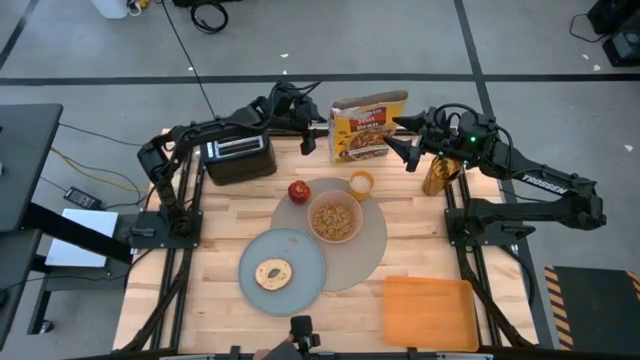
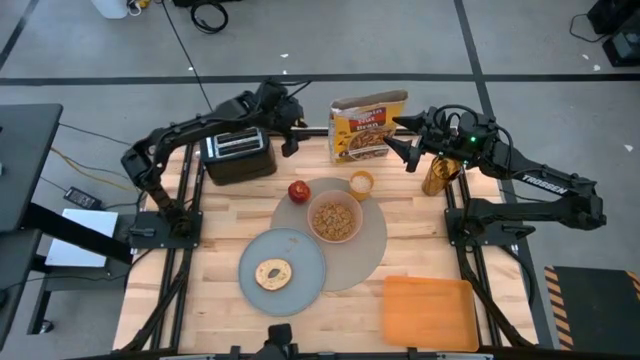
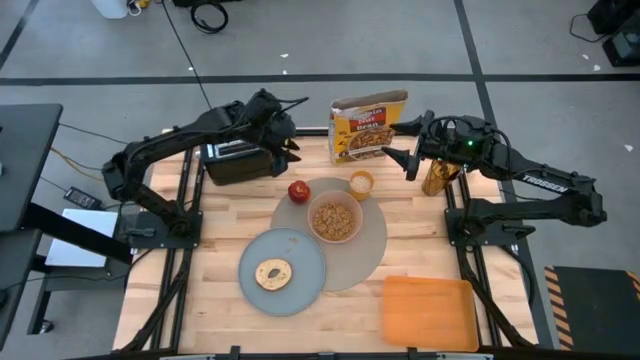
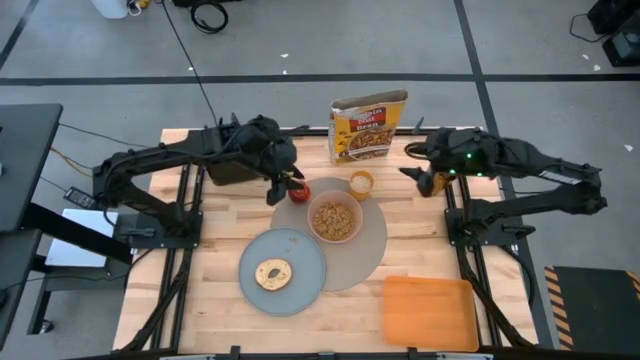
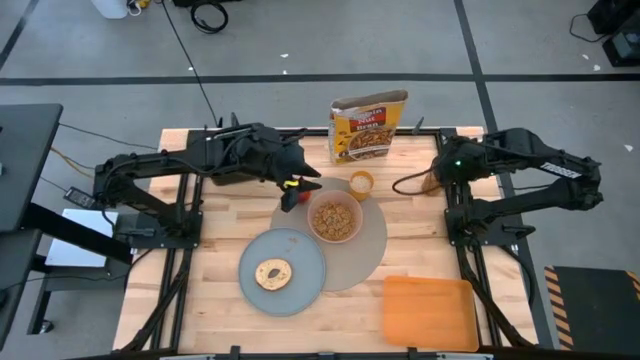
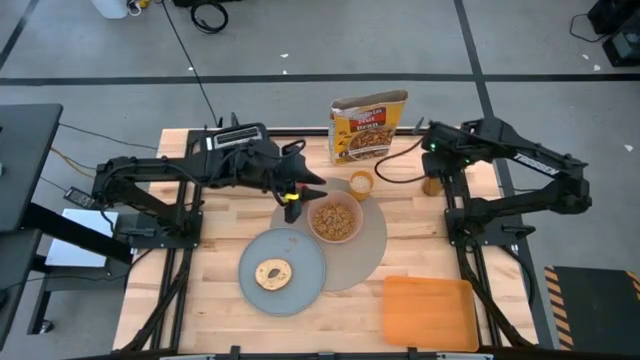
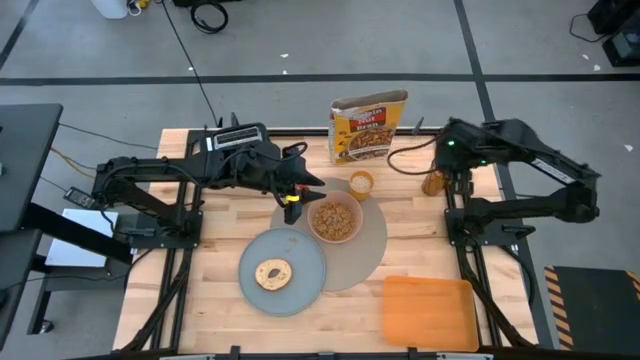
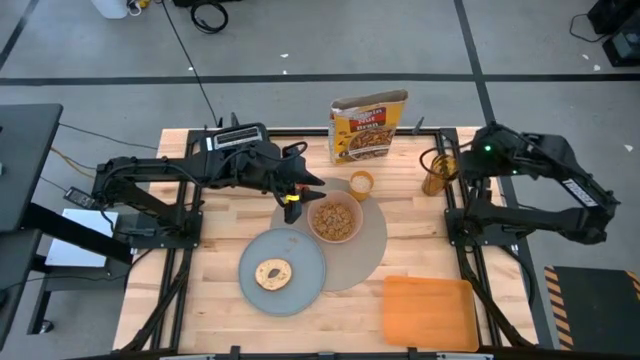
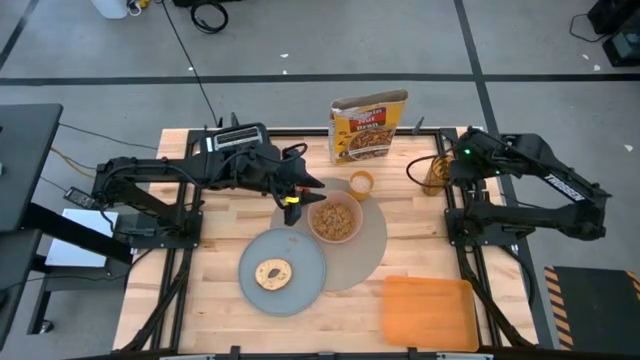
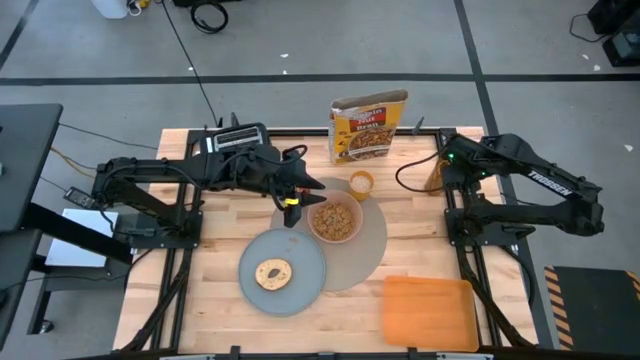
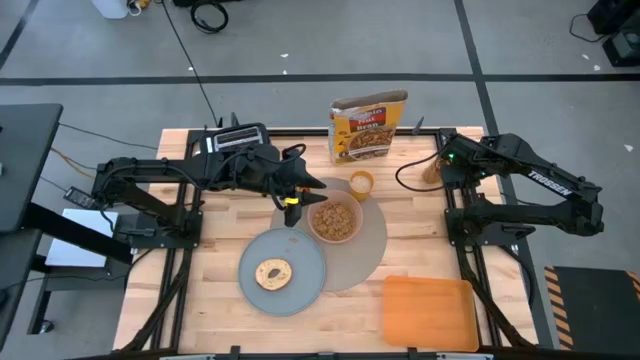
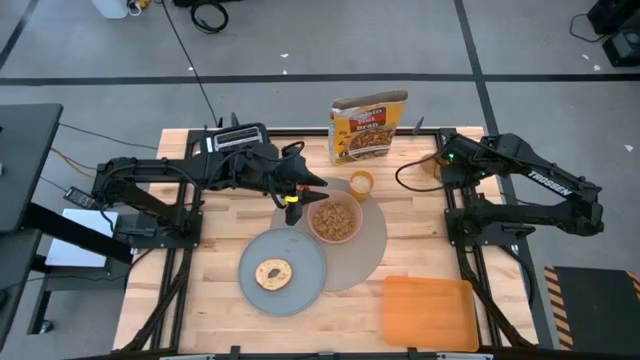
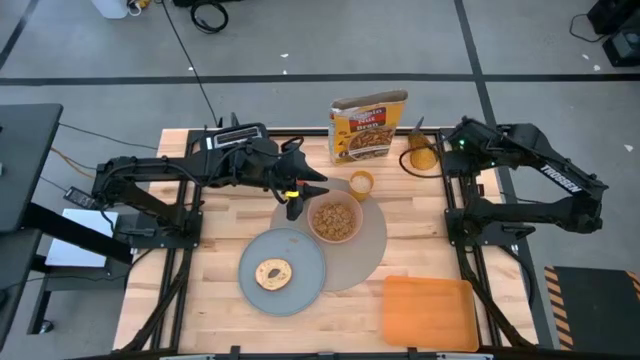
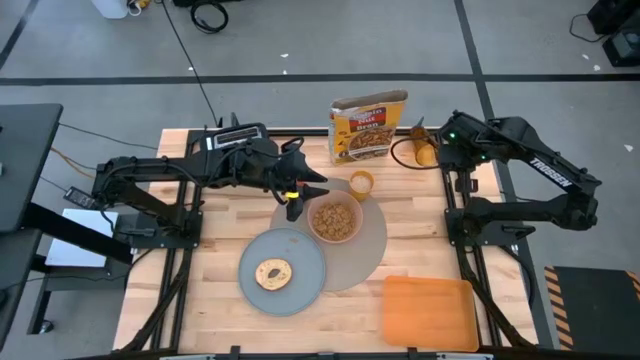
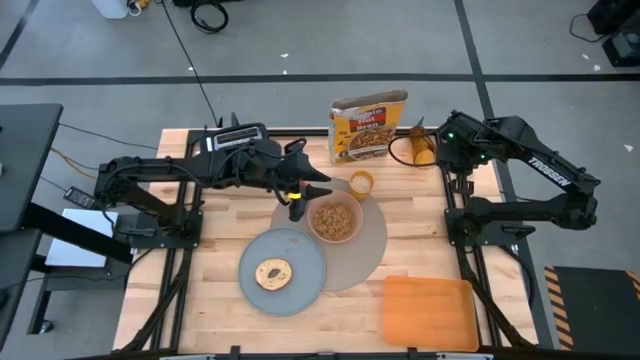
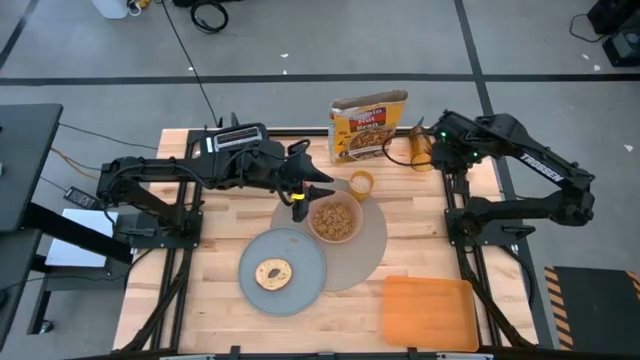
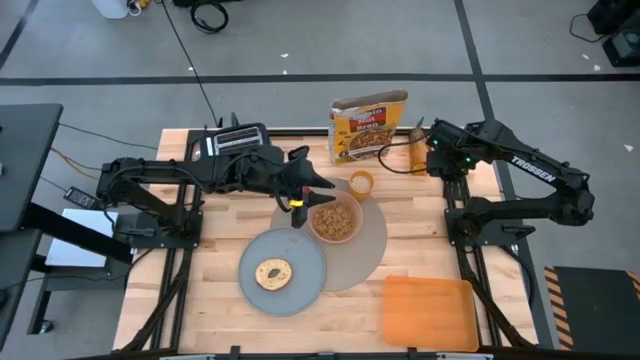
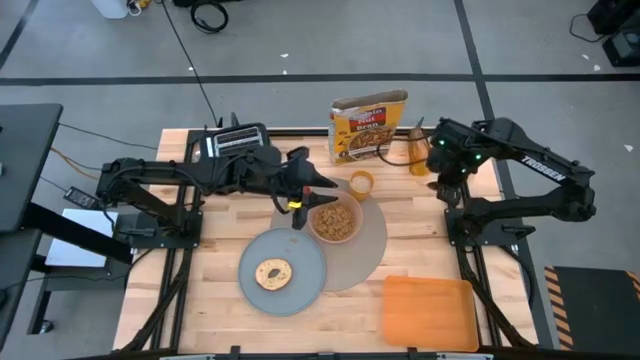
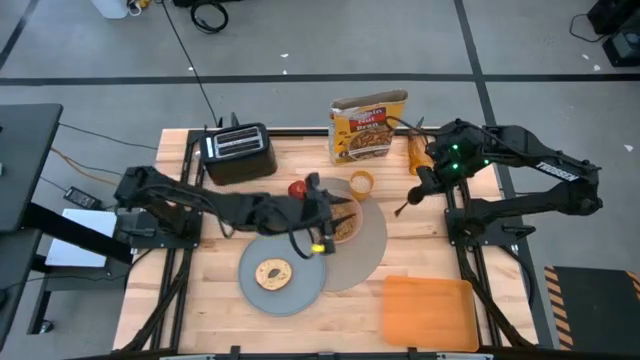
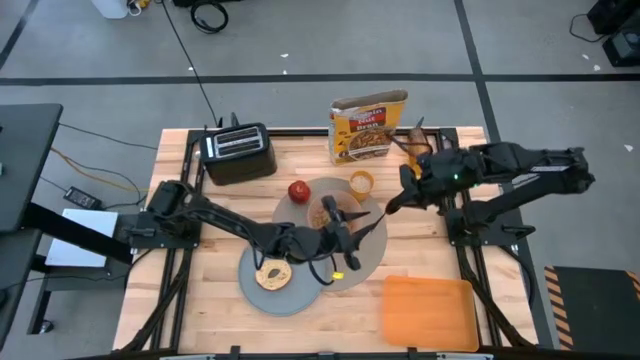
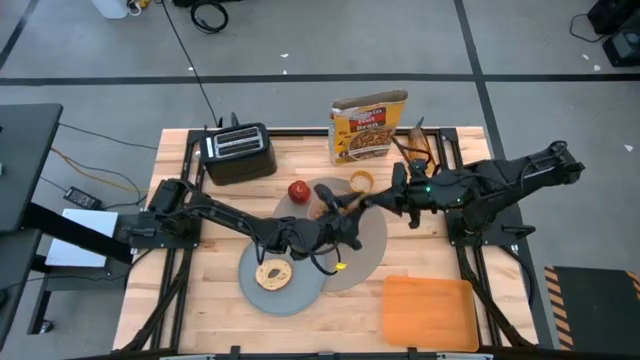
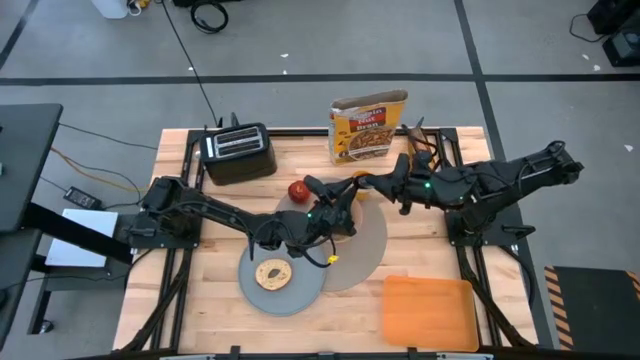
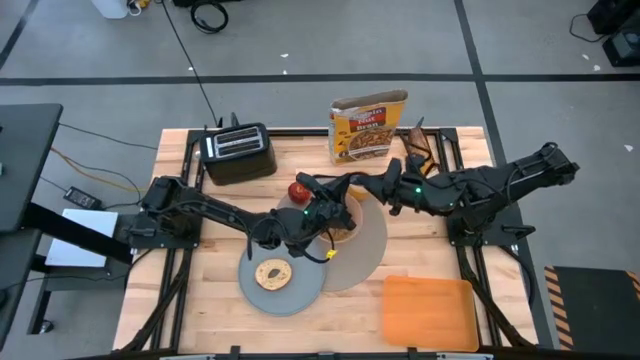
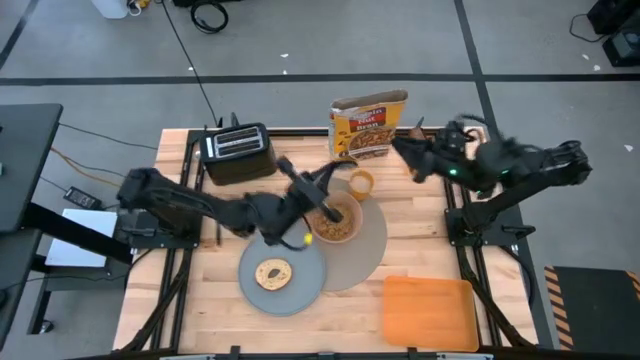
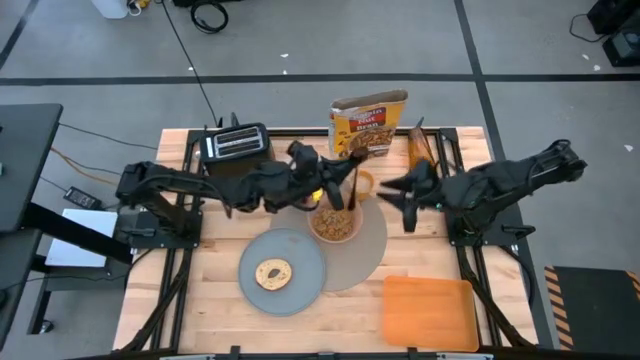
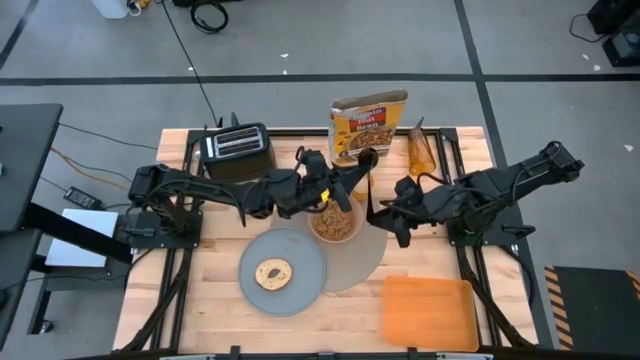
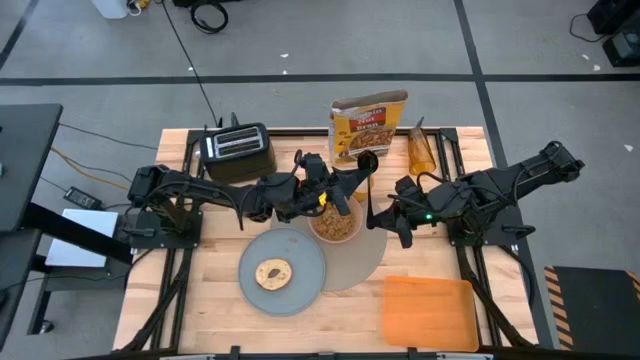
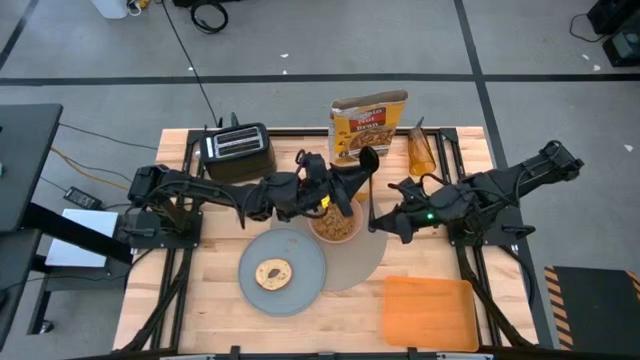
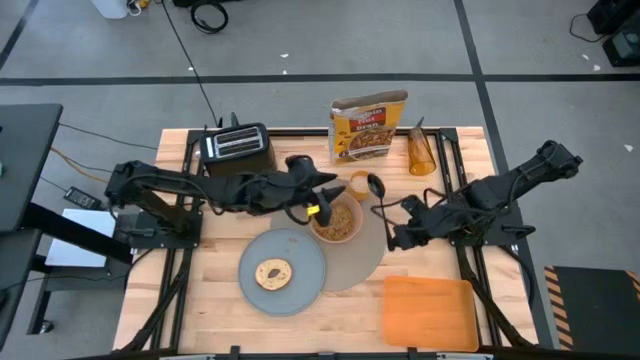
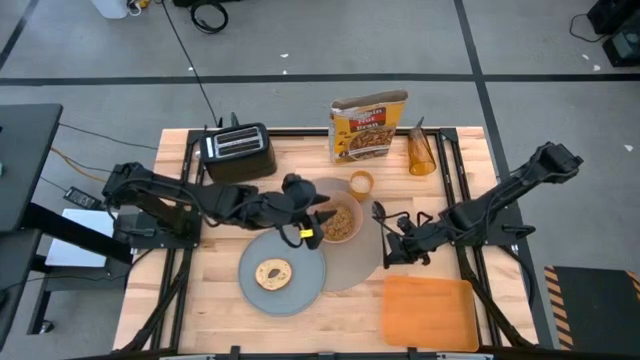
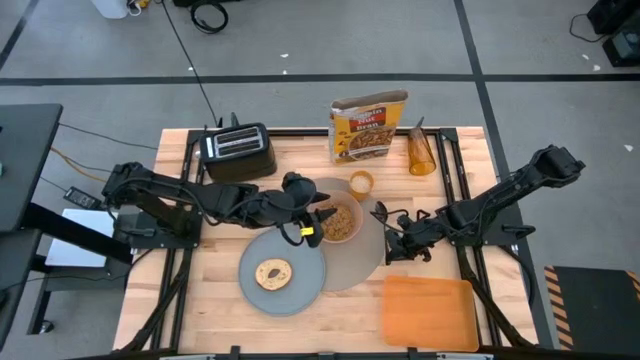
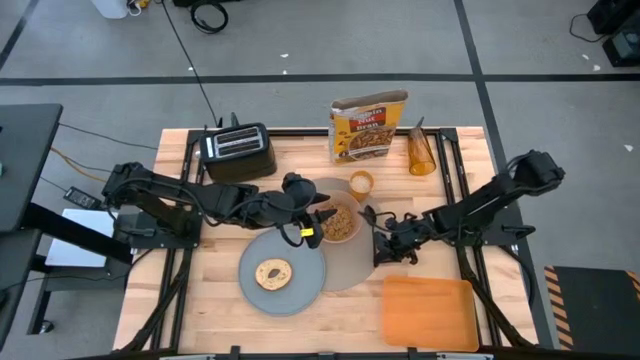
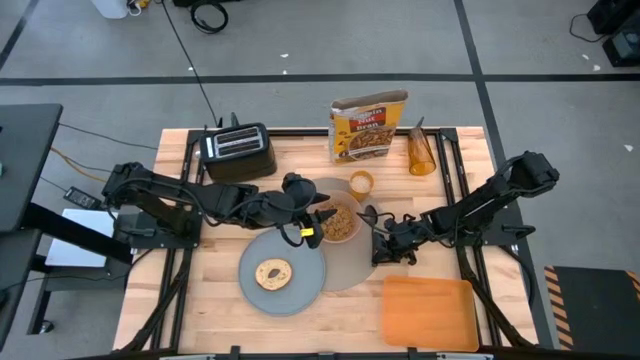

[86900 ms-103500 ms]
Task: Arrange a breakfast setting
Put the black spoon on the gray placemat to the right of the orange bowl

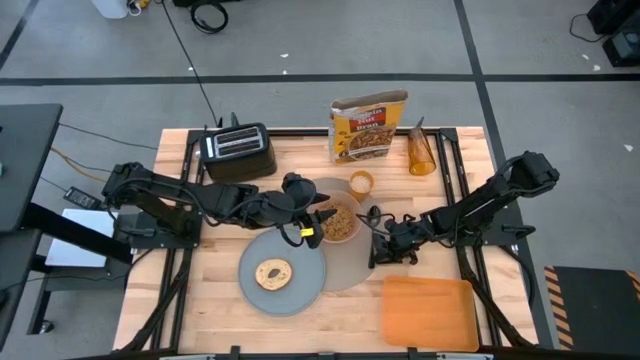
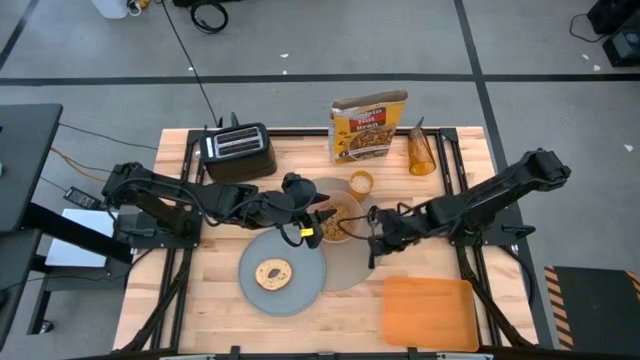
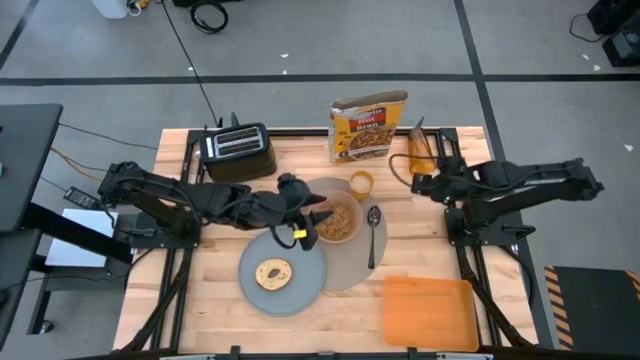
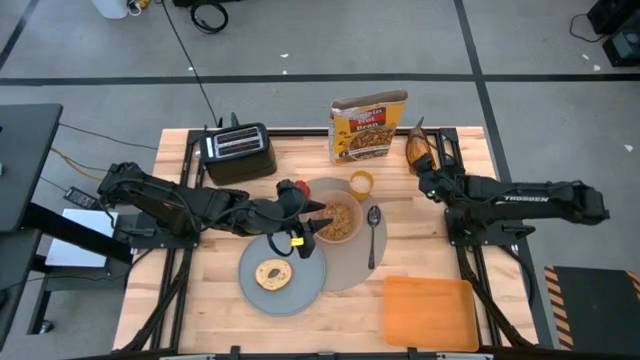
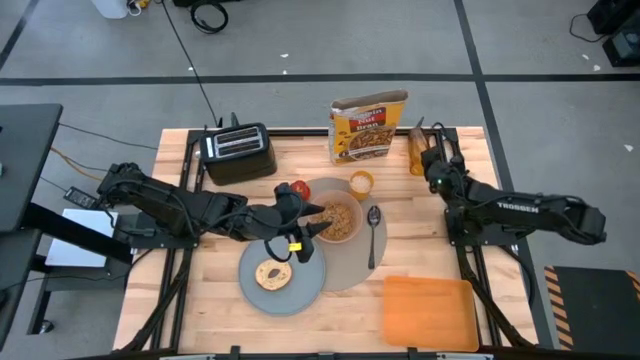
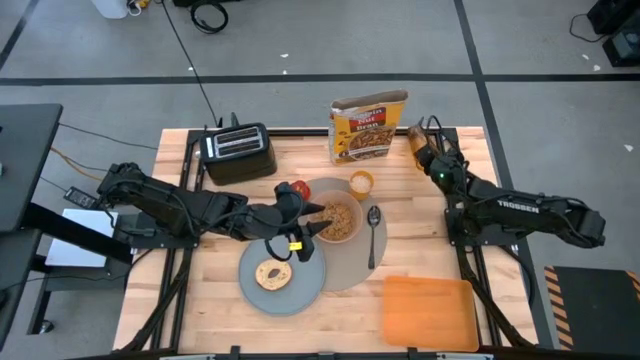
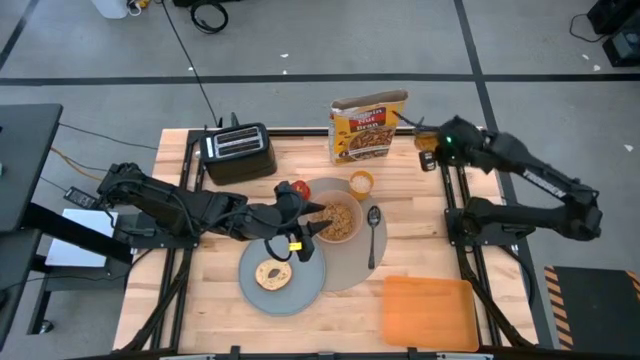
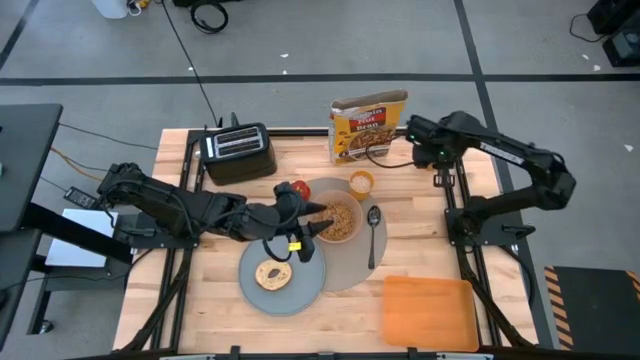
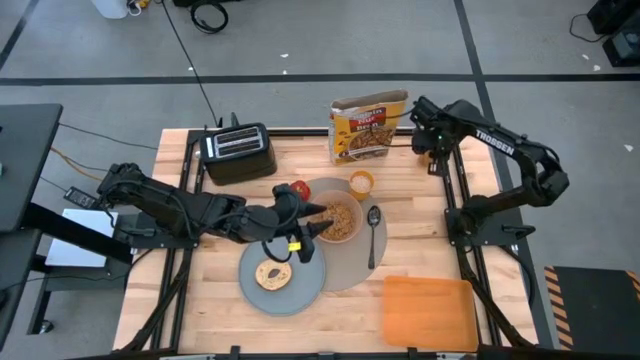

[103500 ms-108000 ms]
Adjust the brown glass on the table

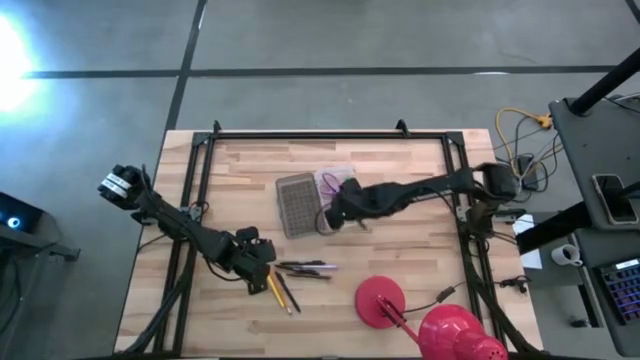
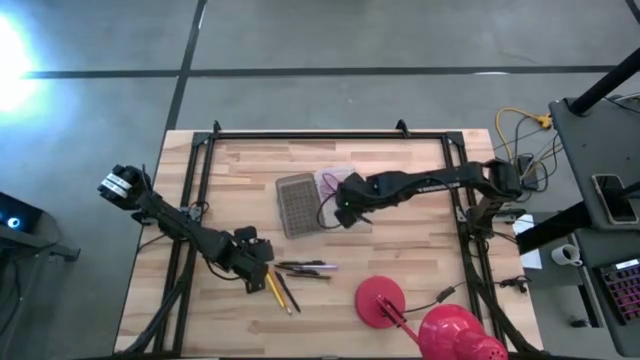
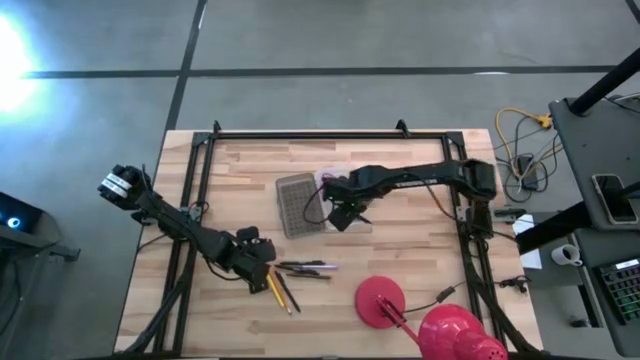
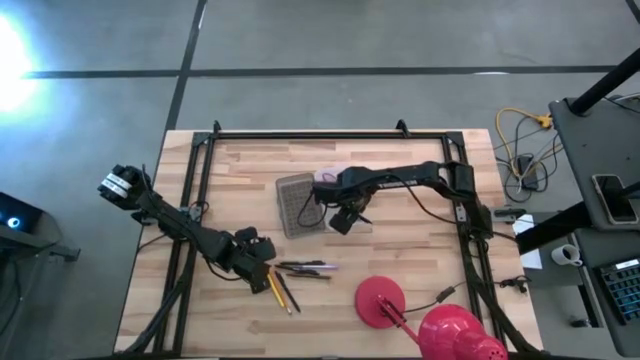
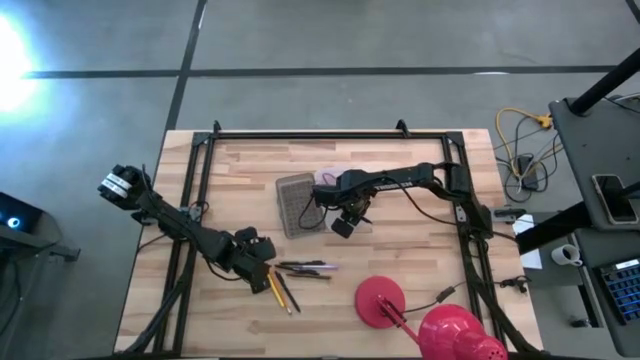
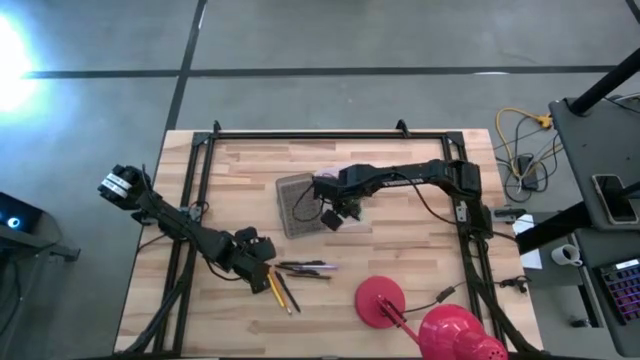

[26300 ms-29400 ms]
Task: Pick & place school supplies into a supply box
Put the black pen into the black supply box
